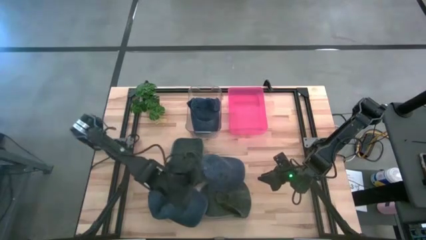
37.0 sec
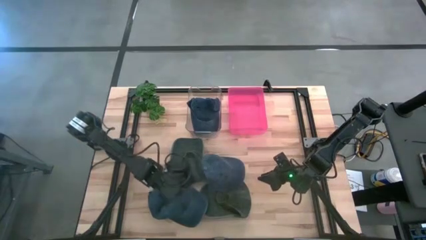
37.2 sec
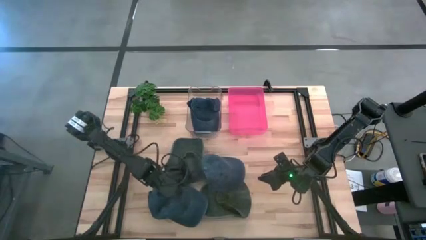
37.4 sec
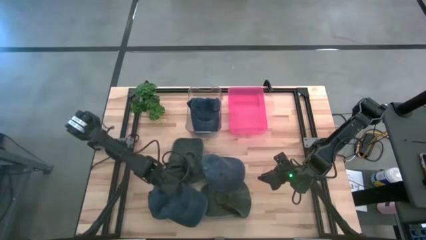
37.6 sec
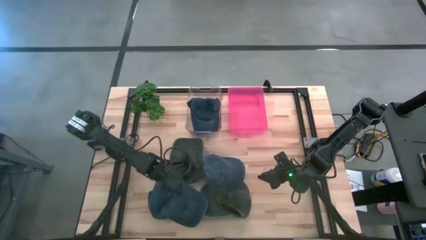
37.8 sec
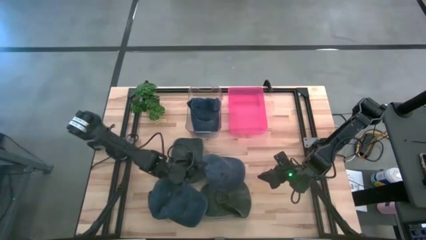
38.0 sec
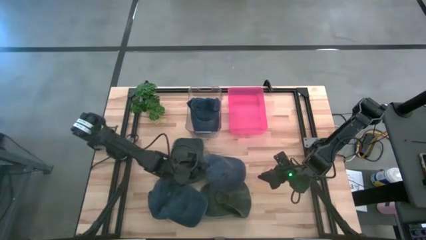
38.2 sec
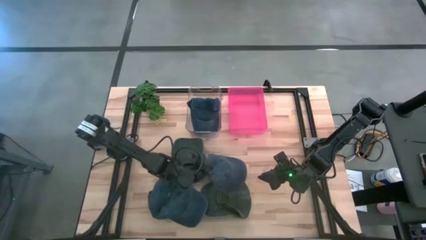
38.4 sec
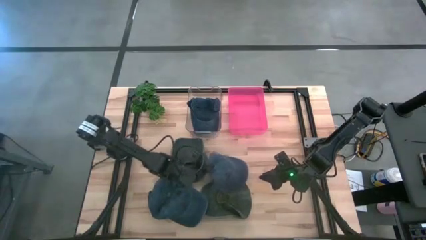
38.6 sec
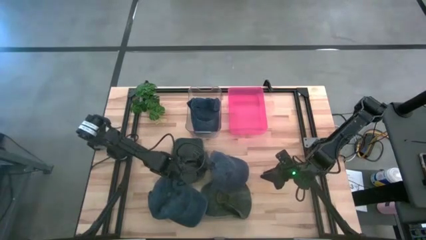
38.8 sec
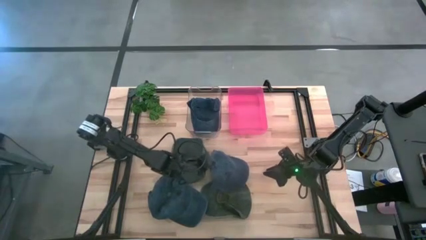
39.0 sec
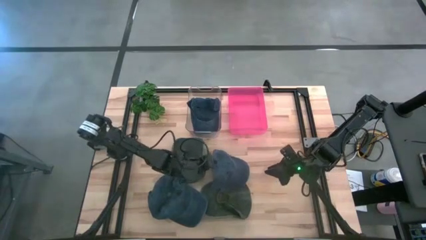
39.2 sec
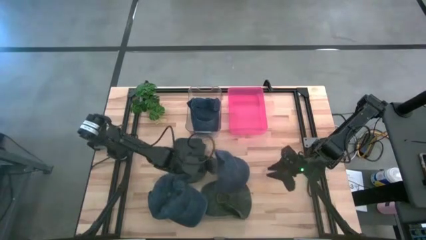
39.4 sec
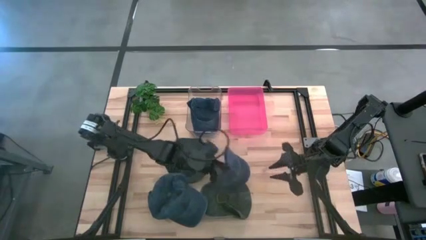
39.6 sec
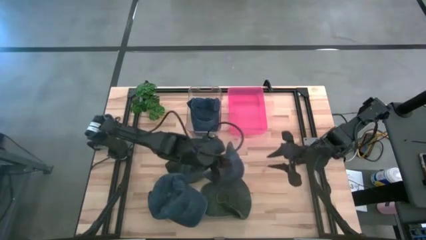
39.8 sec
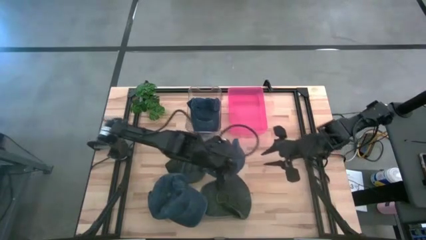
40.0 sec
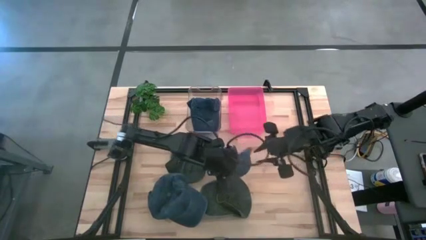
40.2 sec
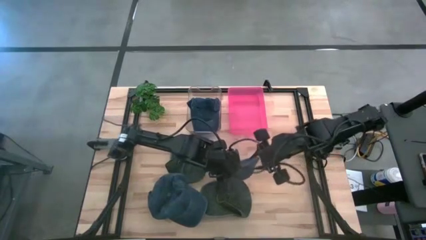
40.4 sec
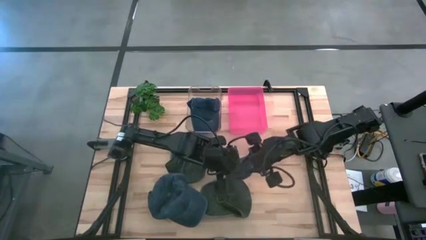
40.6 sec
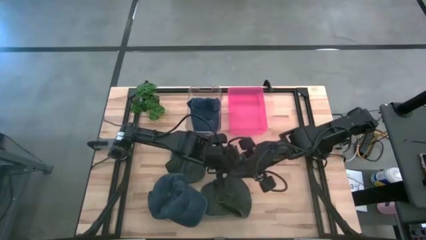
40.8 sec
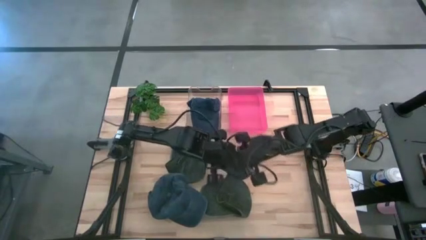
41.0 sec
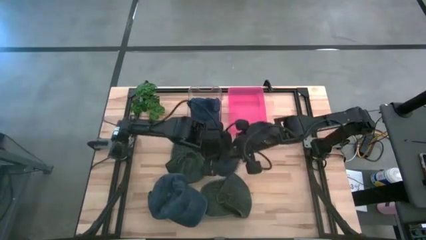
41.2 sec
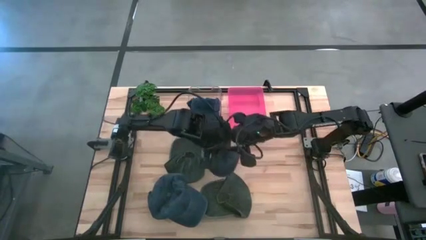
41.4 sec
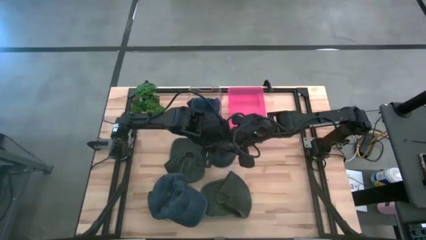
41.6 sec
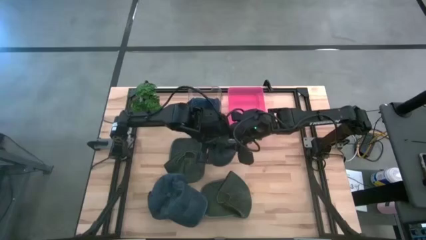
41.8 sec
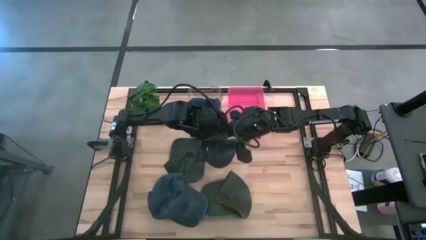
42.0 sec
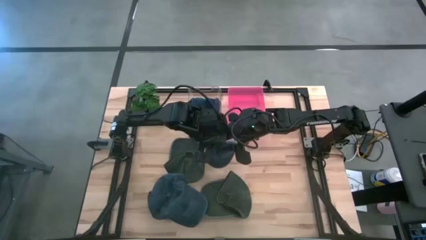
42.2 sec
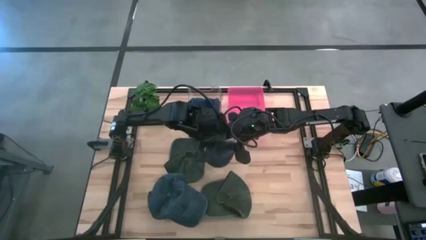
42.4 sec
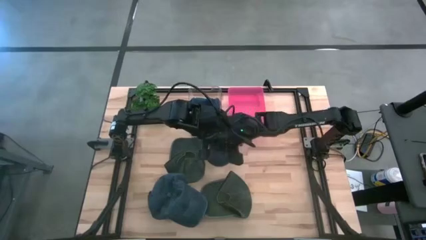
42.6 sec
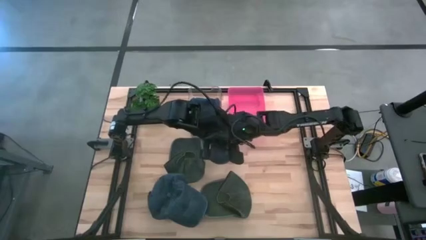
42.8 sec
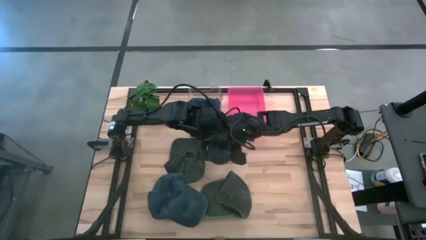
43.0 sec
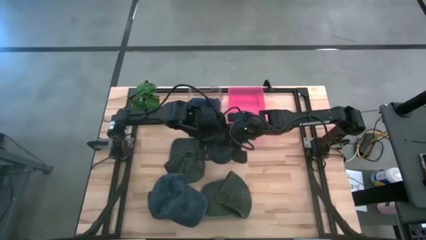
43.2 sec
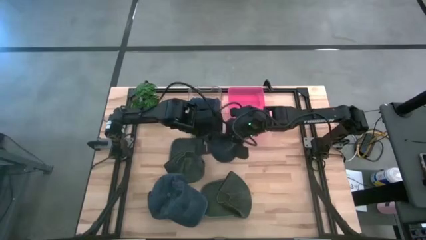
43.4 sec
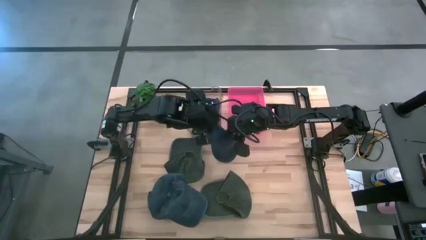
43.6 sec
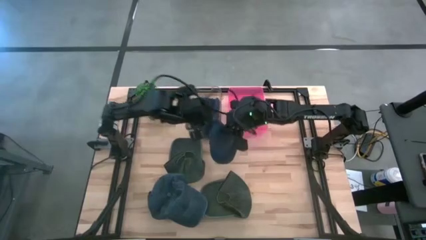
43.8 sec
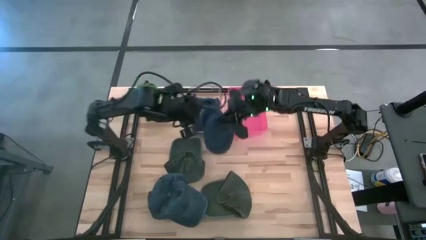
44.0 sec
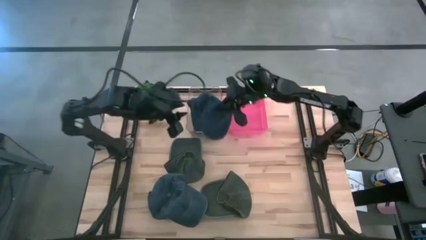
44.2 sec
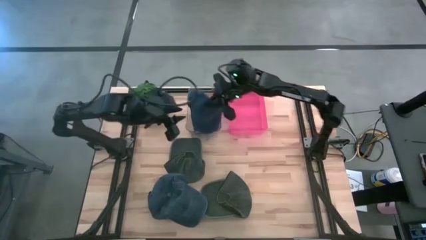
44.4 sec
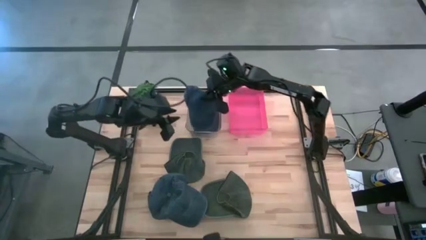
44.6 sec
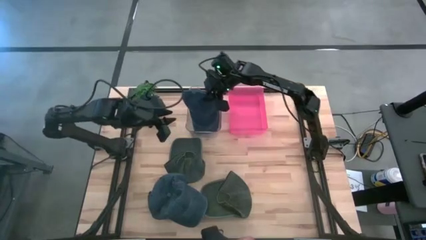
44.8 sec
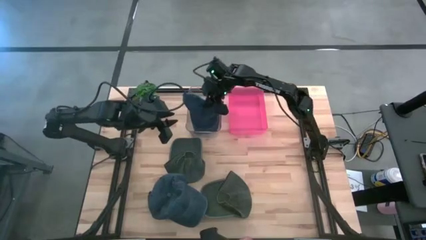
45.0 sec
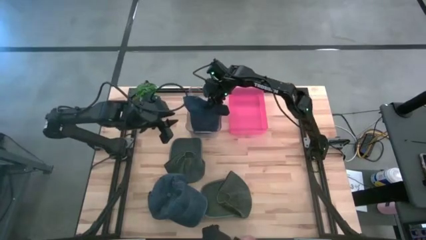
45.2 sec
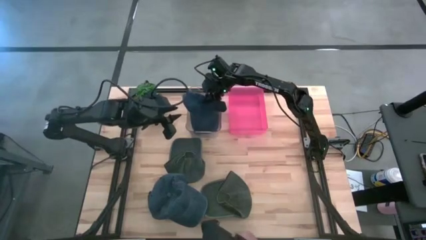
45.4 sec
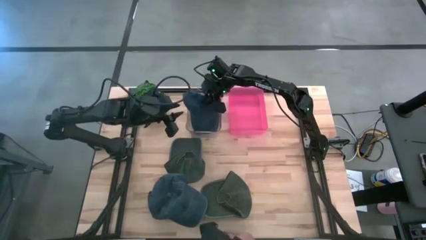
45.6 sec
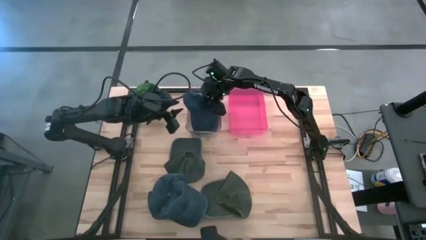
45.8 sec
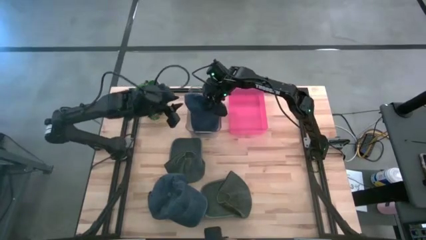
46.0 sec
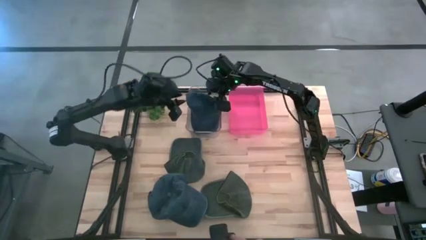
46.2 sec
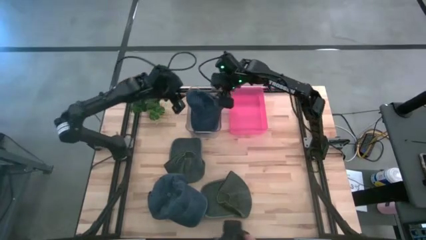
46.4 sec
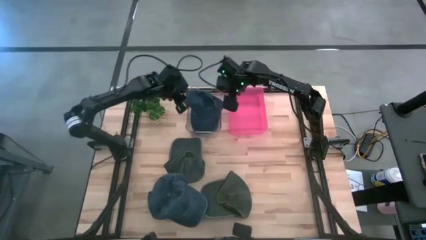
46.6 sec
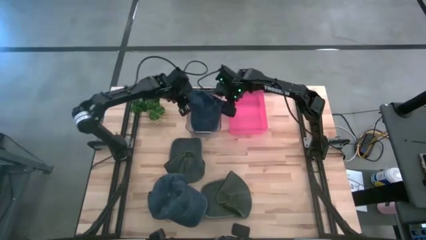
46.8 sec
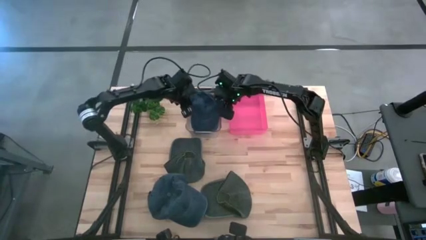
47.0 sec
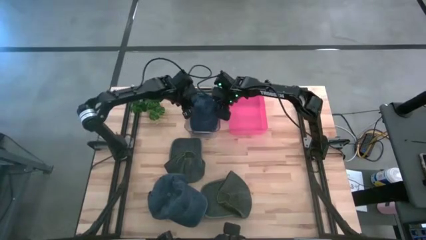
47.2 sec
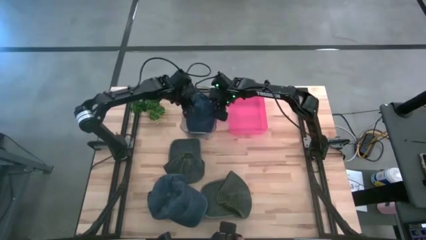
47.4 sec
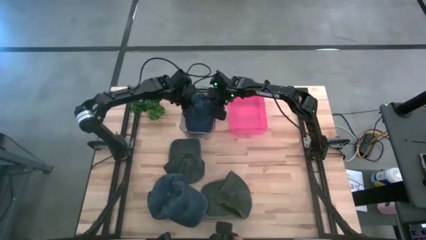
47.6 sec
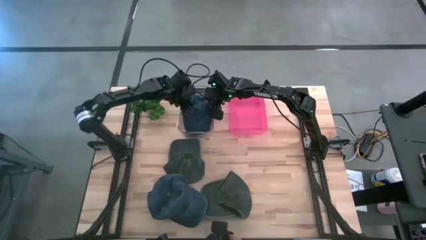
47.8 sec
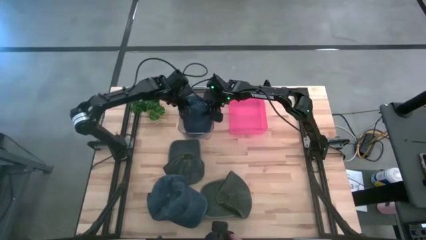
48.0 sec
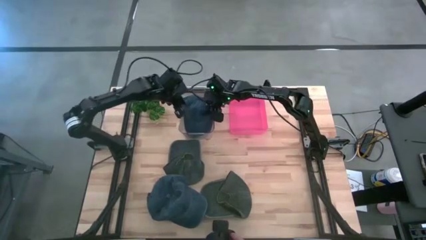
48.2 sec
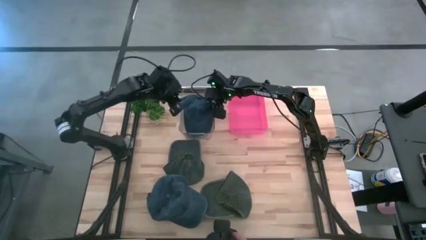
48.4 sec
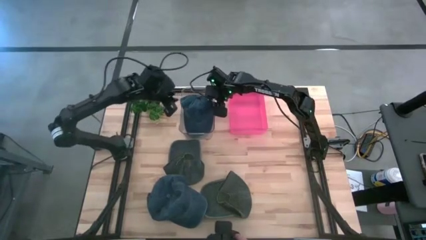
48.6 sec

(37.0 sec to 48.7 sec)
Task: Pick & Place hat
Put the right blue cap into the transparent bin
